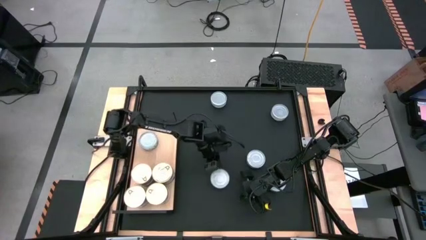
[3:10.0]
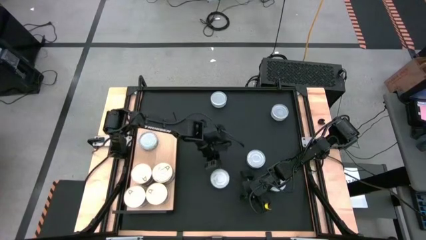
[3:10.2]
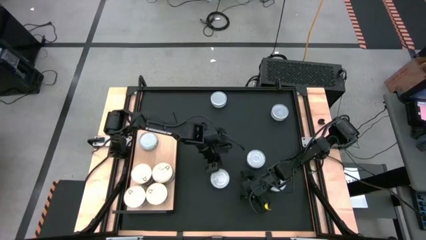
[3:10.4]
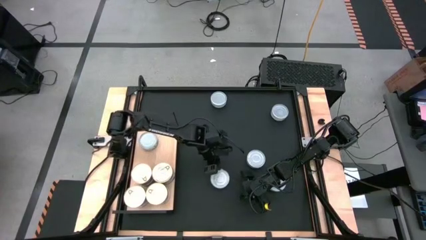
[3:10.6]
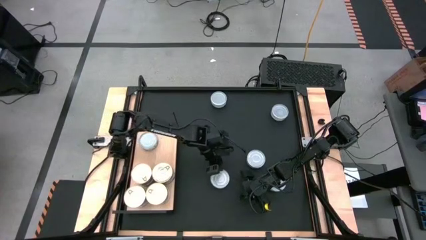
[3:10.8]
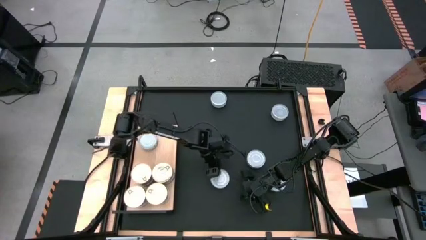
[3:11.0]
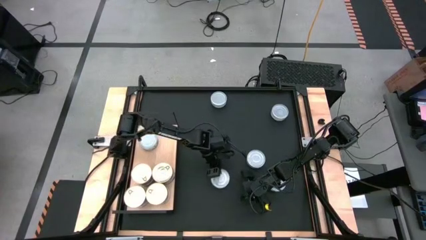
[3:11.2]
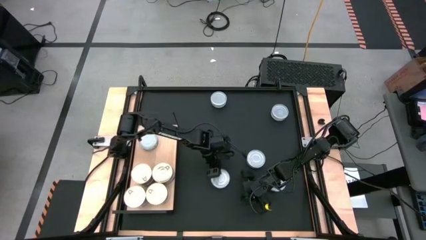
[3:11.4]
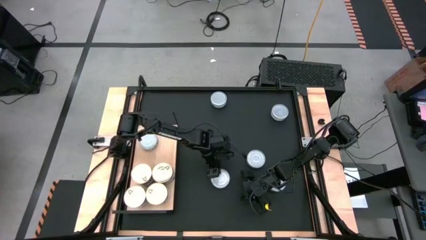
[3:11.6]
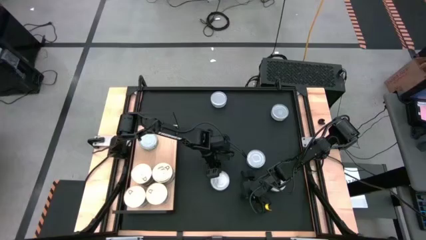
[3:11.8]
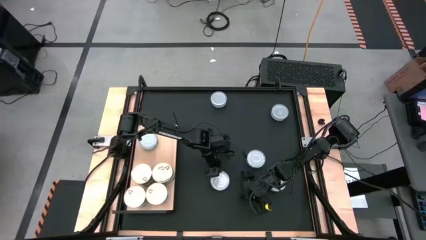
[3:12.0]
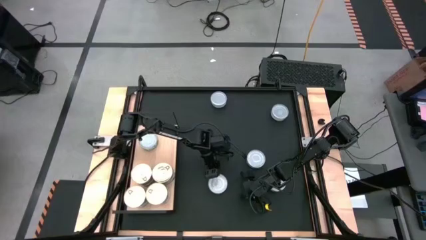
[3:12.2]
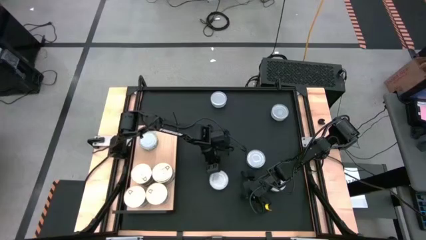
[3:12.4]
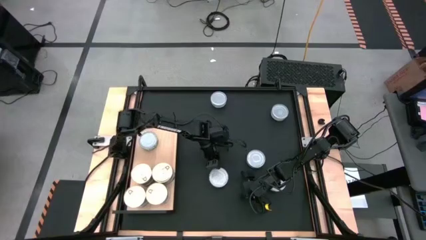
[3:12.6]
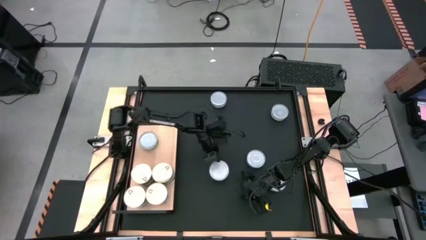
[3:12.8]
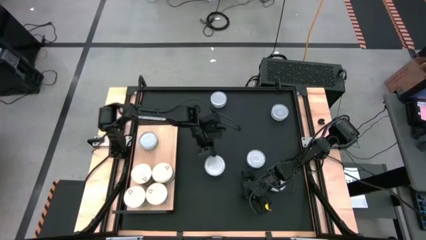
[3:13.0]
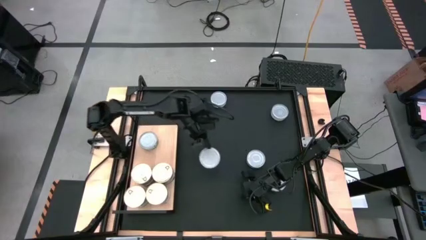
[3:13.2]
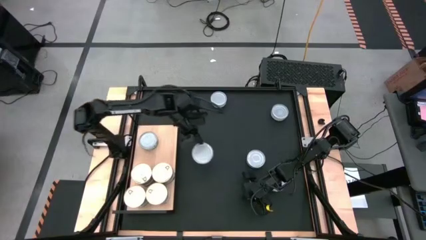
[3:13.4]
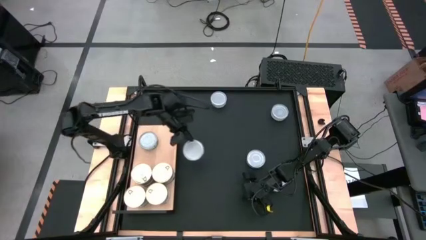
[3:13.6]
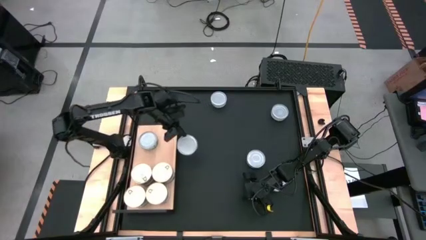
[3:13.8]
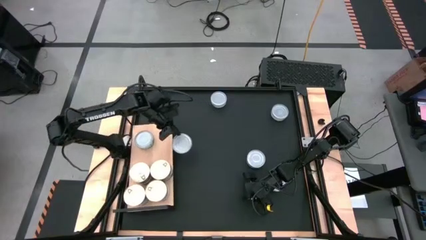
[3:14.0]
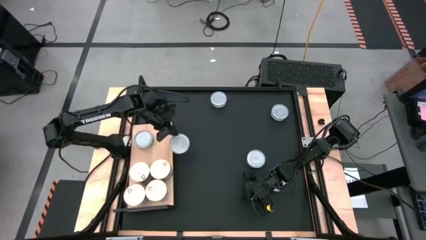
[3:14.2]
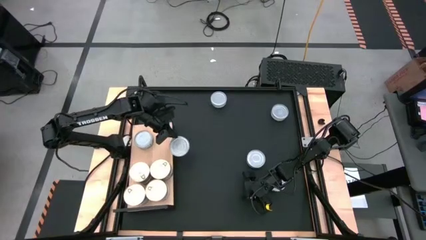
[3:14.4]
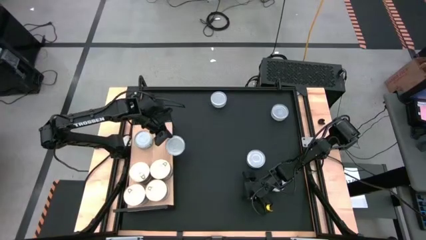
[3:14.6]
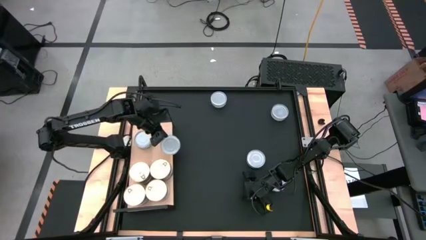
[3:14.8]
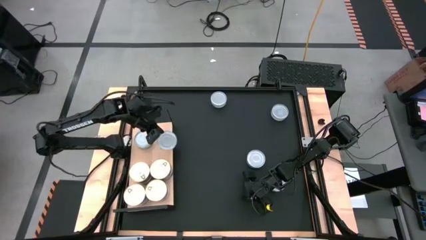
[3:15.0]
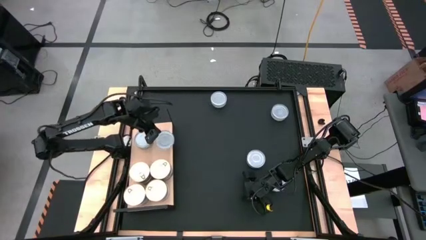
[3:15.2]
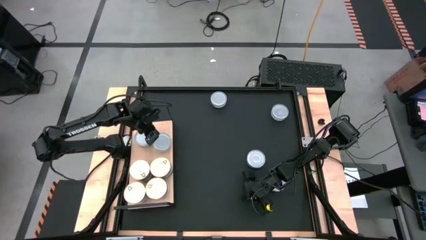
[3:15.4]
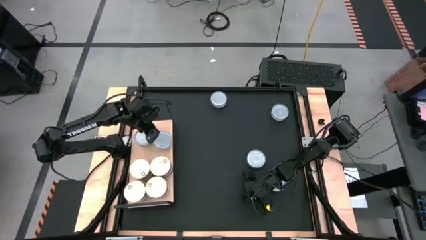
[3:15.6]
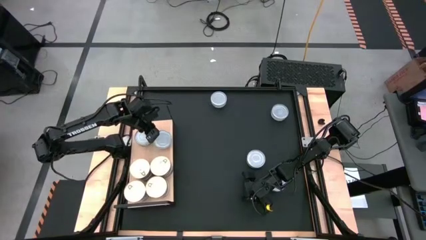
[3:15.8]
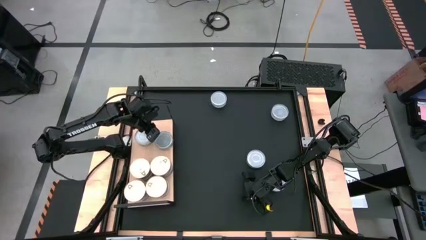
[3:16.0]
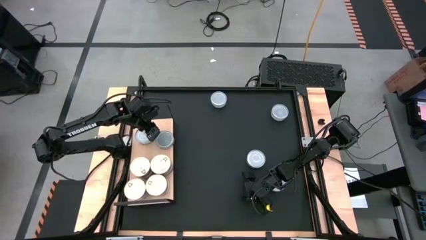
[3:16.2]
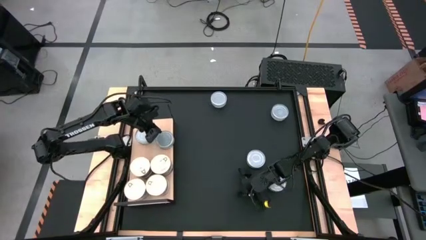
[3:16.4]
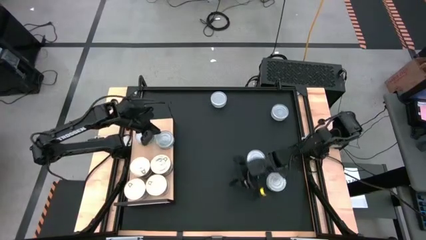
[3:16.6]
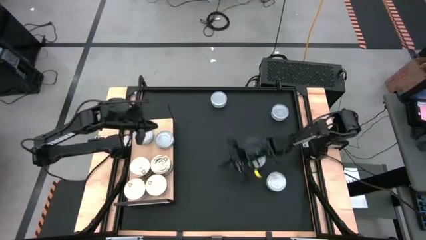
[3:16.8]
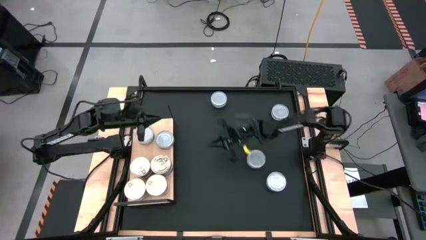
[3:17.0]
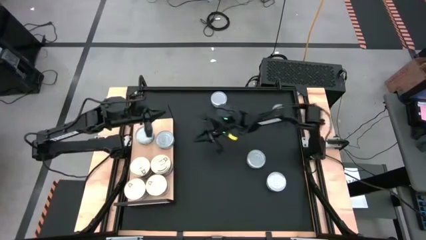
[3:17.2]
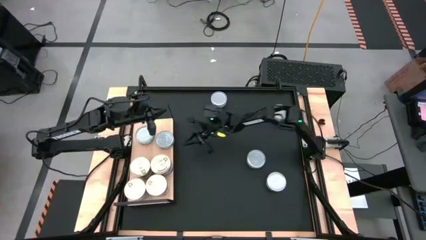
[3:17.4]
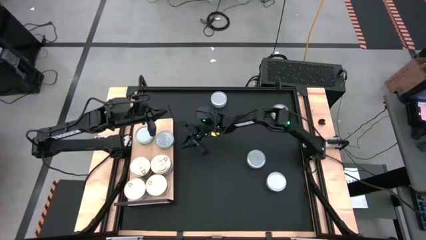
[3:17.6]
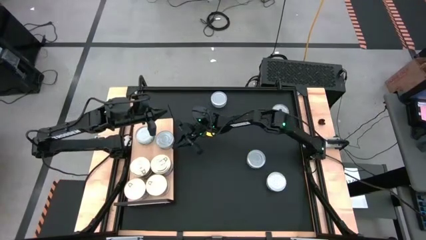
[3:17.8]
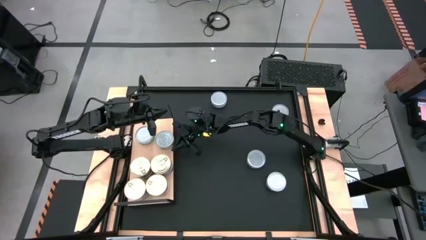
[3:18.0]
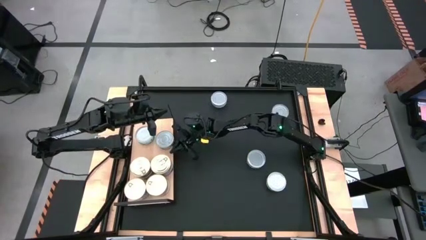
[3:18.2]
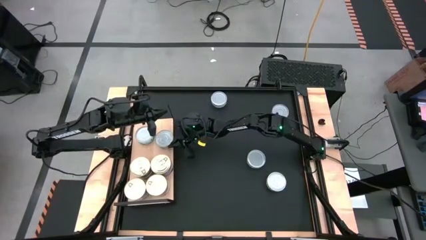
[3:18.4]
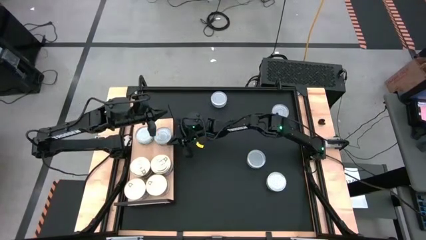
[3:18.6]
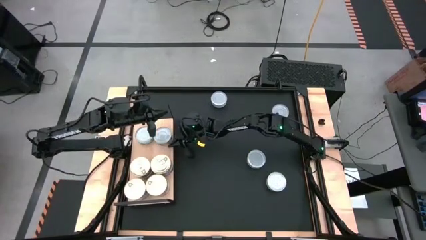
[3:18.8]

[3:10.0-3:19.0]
Task: Stack canned seafood by type on shelf
Put the green tuna can aligned with the other green tuna can on the shelf

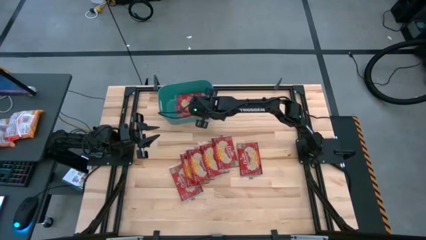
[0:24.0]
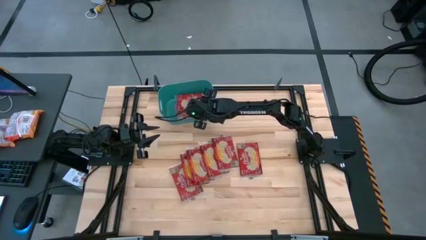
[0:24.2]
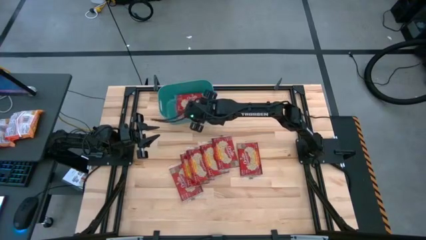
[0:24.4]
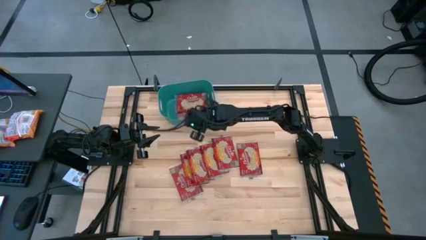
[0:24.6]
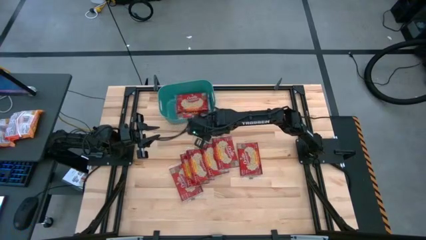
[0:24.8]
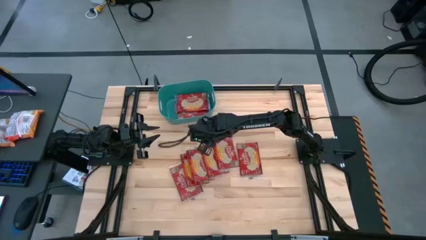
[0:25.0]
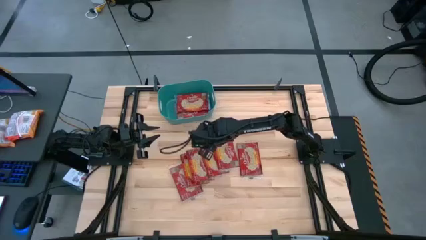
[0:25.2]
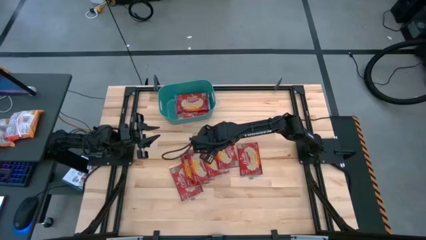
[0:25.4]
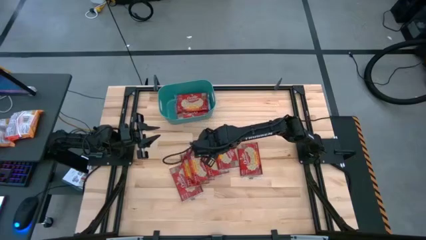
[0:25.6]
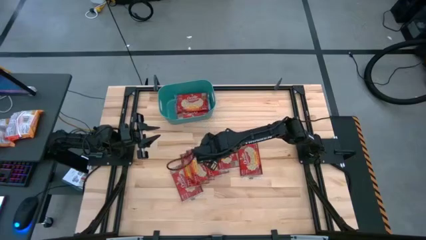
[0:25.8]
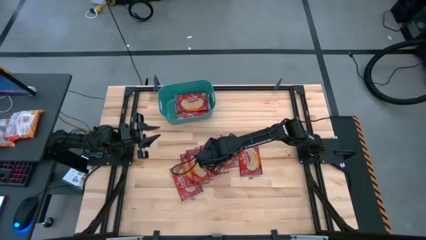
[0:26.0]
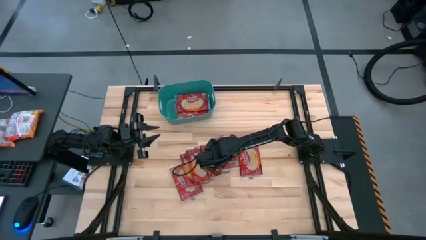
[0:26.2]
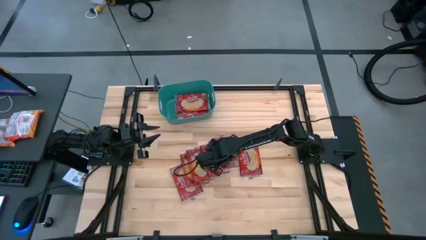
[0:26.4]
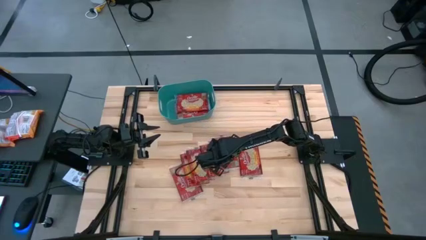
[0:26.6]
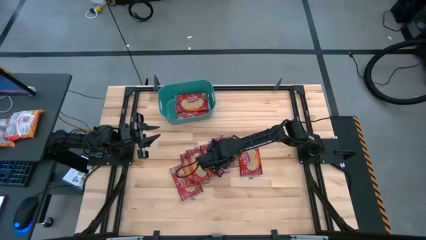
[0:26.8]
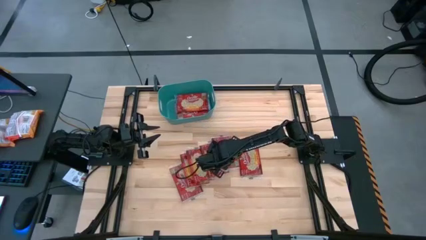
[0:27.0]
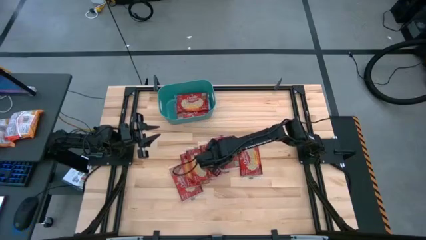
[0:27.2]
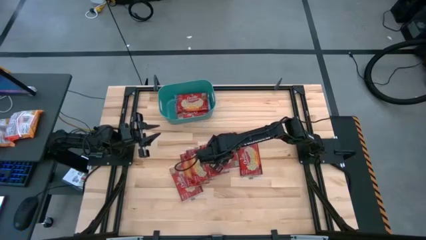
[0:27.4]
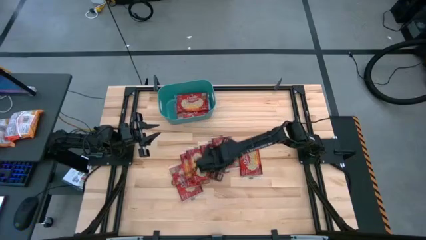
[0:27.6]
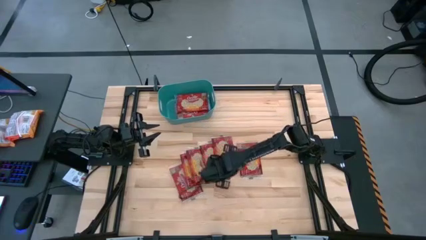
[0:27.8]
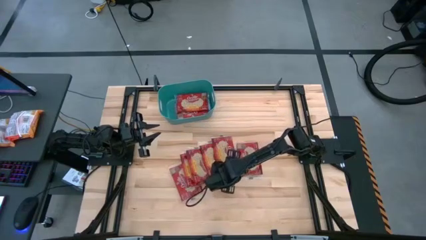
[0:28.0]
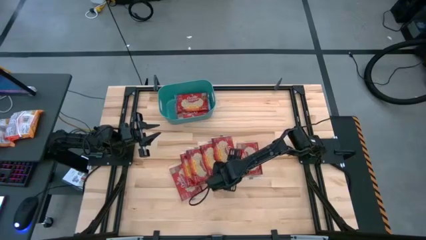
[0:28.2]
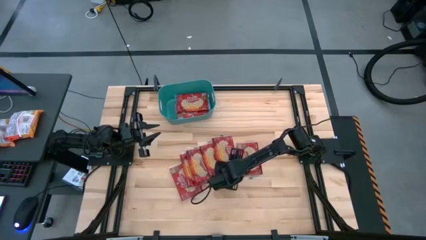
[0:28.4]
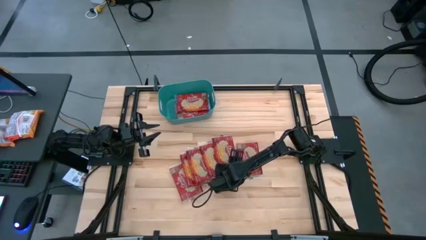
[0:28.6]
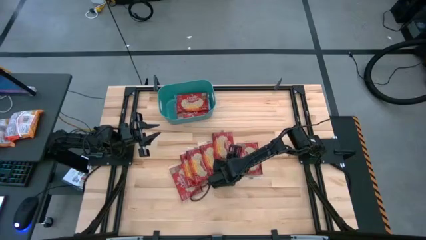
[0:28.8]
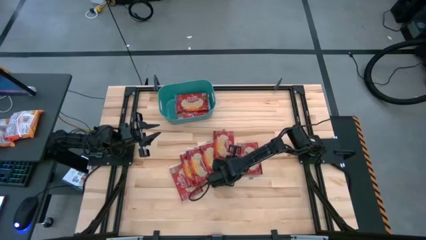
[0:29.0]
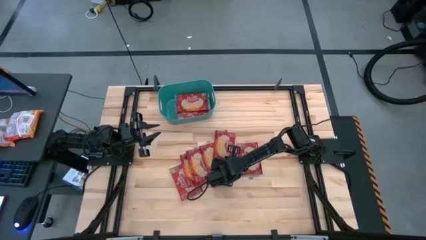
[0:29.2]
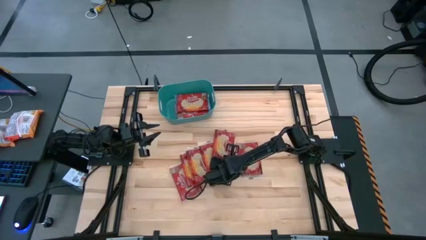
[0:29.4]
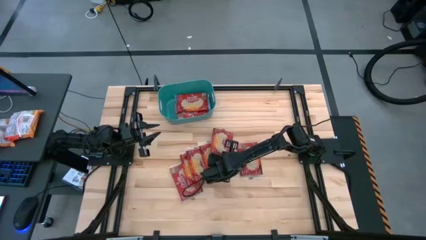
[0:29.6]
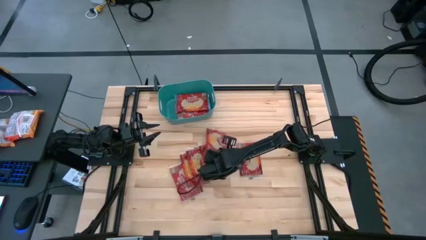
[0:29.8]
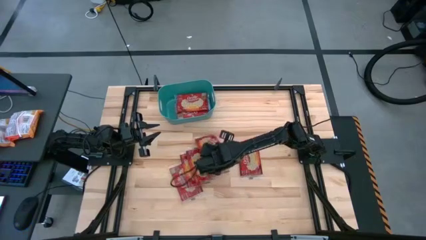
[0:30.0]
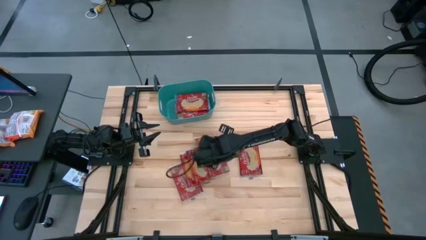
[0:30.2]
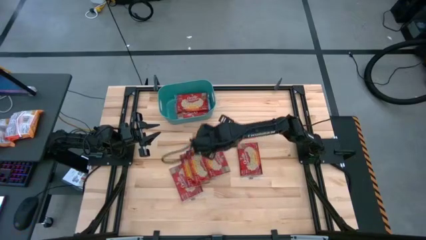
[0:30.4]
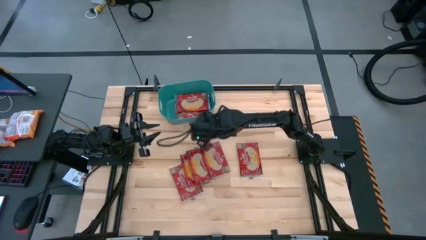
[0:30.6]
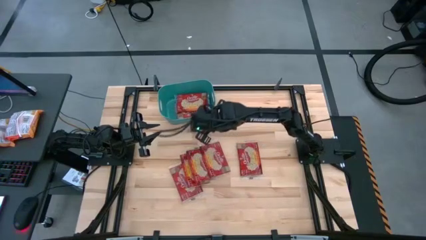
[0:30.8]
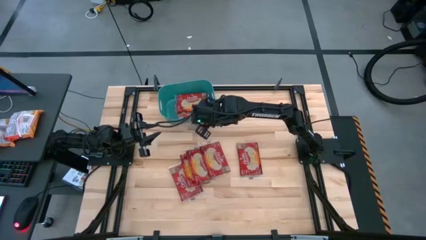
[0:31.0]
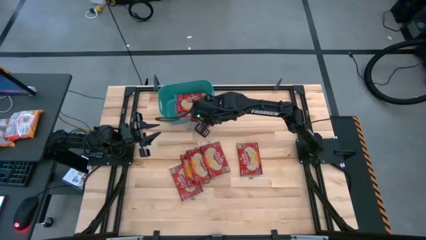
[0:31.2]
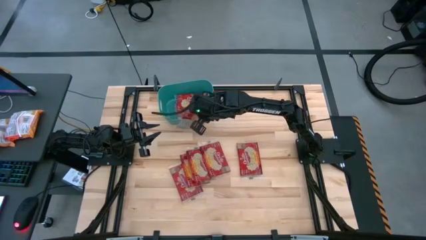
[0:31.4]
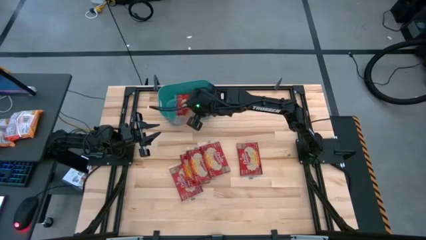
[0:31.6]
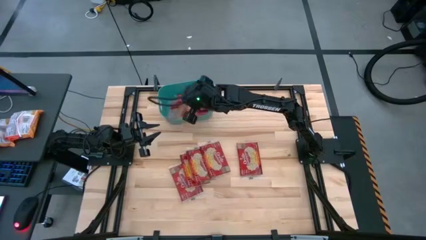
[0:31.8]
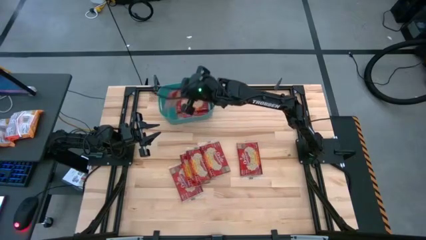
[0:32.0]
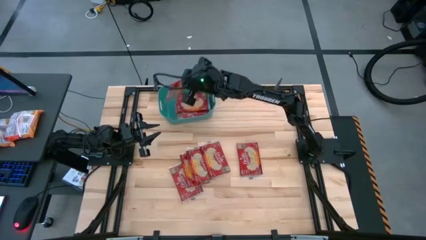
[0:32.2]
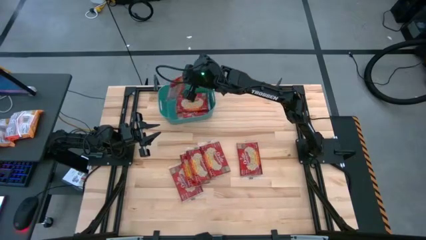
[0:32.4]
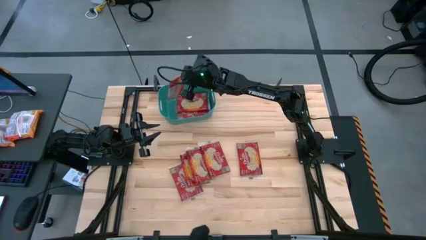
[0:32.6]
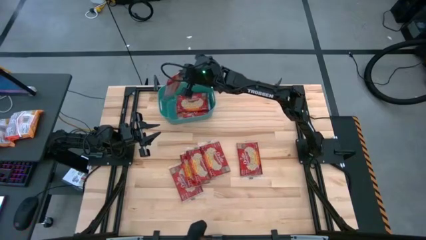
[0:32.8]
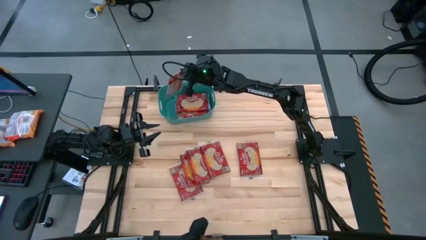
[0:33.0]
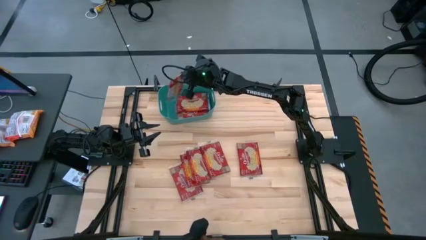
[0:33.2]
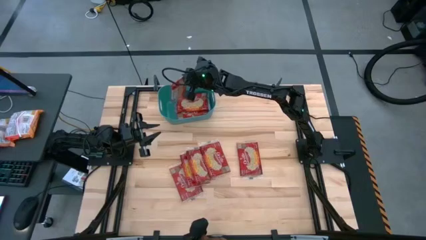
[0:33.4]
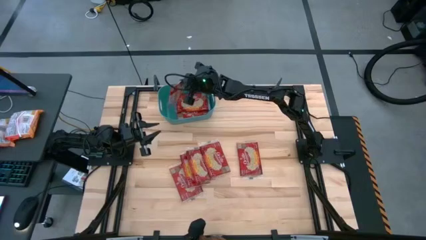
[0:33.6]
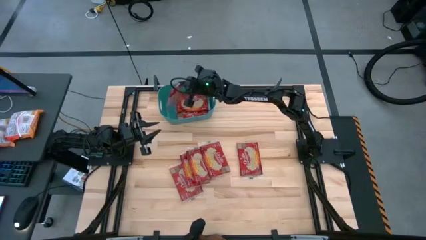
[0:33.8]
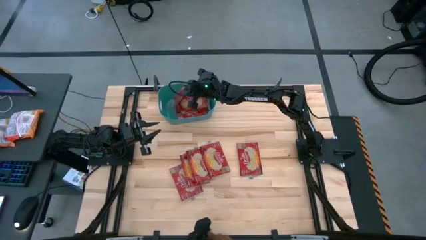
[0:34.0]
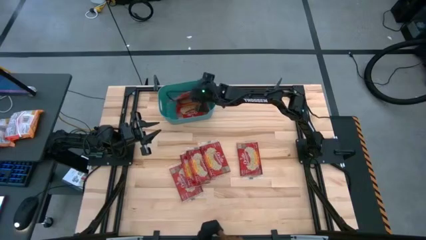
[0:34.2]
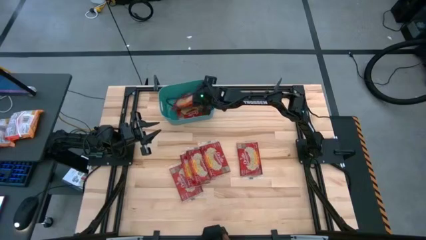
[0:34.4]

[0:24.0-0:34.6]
Task: Sort popcorn bags into baskets
Put the red popcorn bag into the blue container
